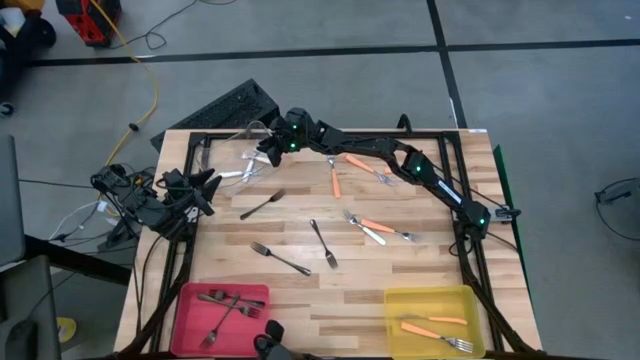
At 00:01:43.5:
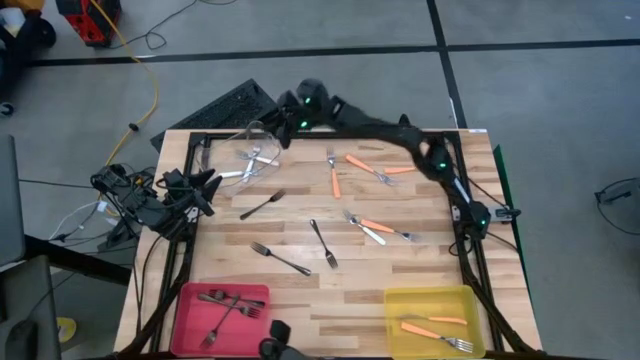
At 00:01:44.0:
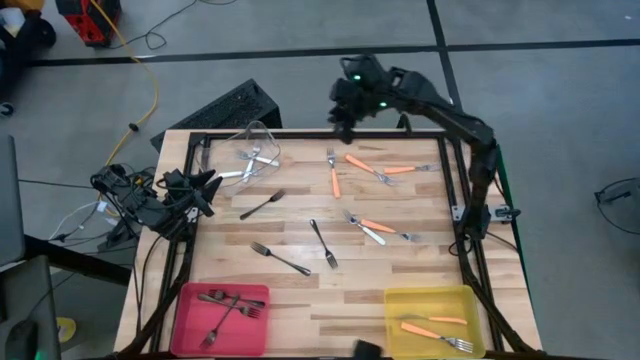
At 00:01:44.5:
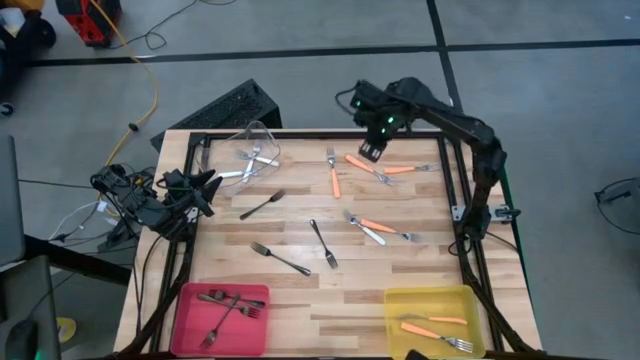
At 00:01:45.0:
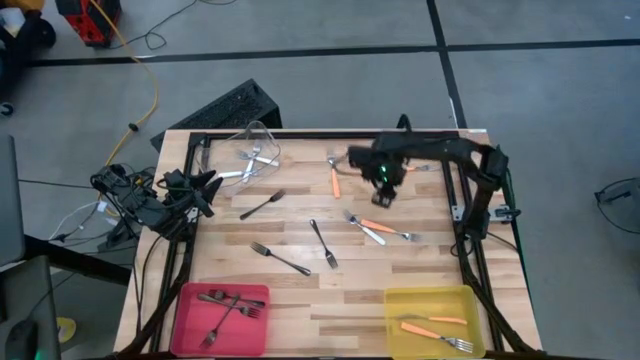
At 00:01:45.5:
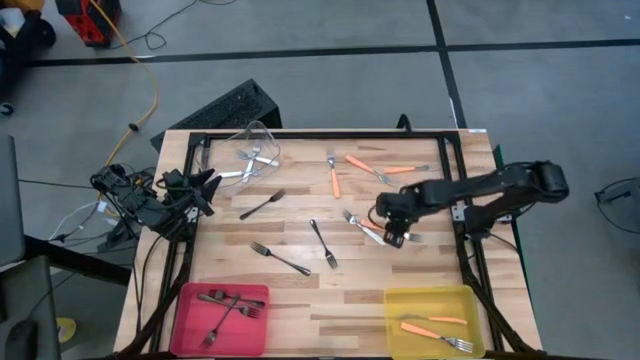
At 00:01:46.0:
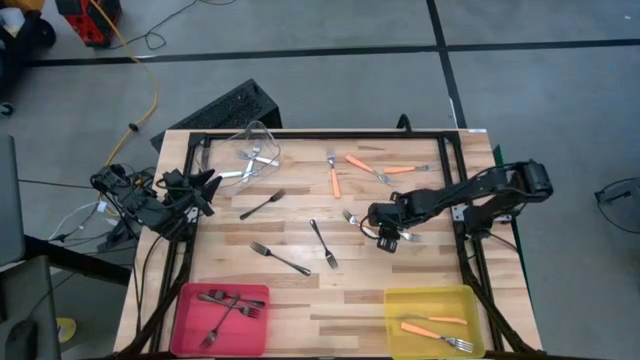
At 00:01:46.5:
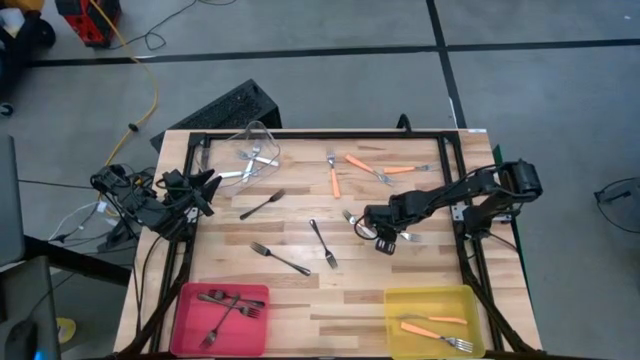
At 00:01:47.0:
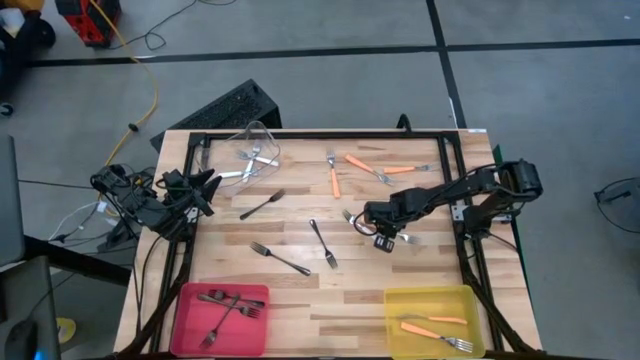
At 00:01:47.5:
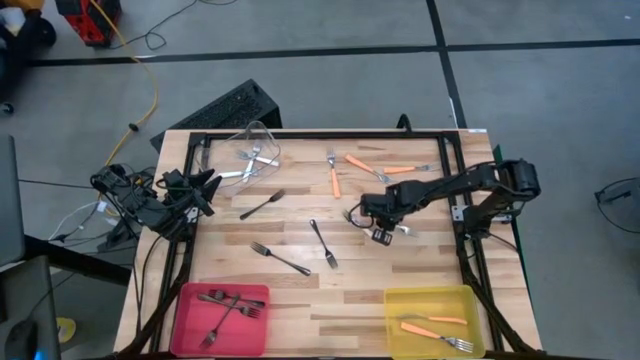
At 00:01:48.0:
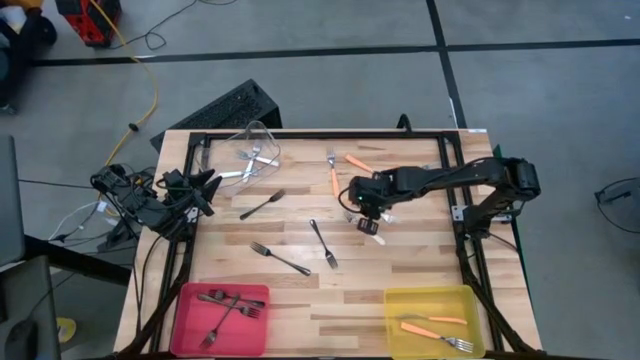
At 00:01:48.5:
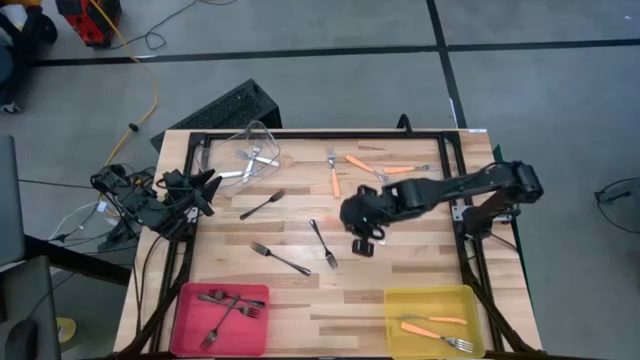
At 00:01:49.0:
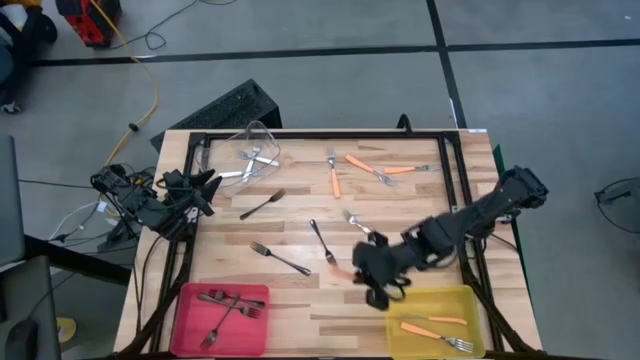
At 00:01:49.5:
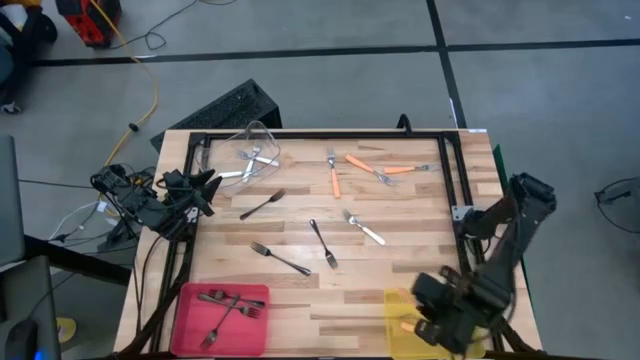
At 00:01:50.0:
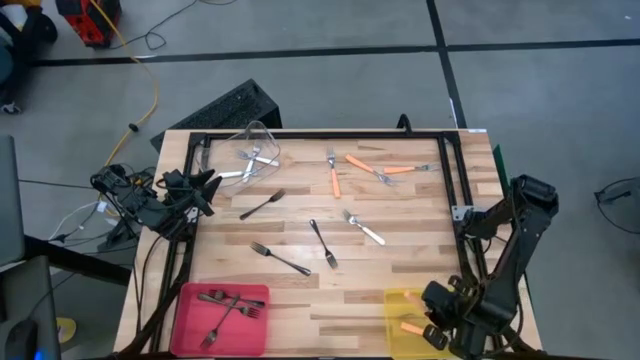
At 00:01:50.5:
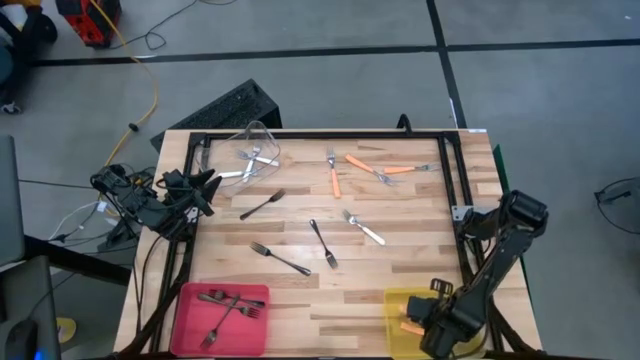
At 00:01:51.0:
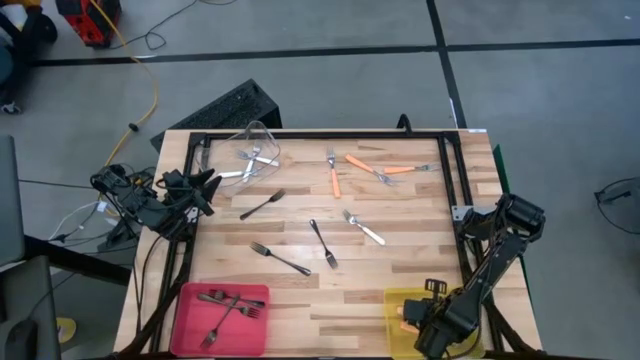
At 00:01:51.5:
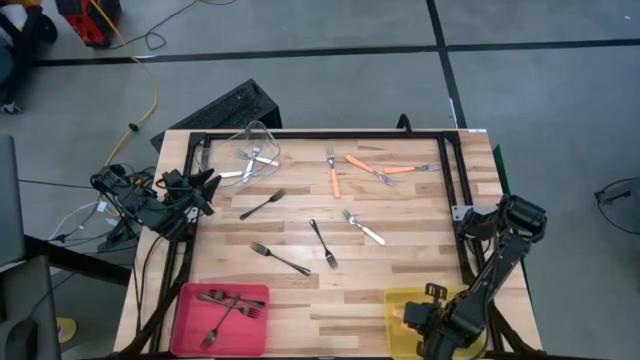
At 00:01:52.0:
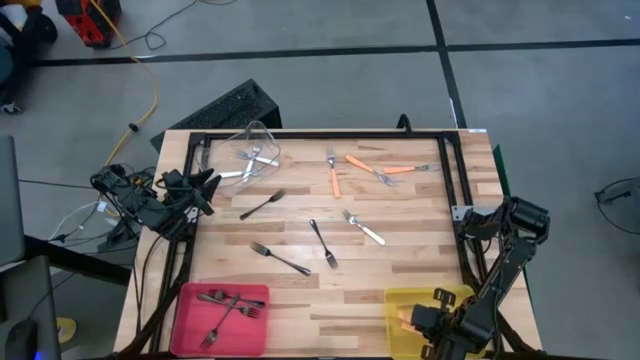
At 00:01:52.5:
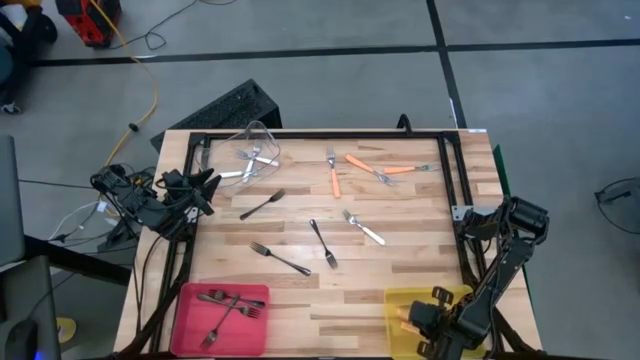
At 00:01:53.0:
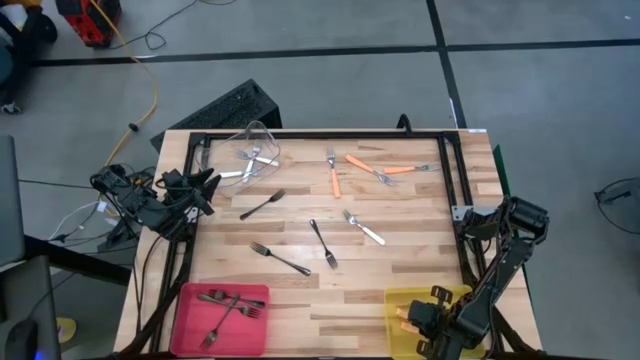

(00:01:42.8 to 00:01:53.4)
Task: Sort silverware by color (type)
Put the orange fork into the yellow bin

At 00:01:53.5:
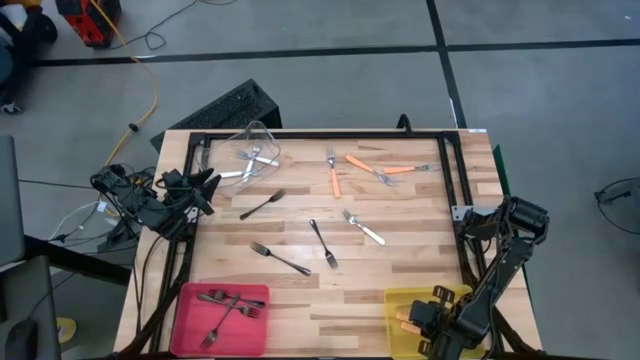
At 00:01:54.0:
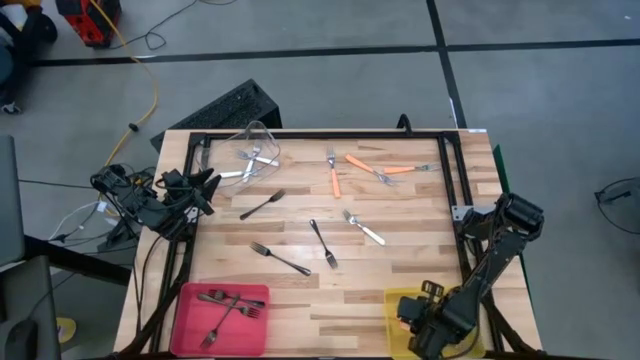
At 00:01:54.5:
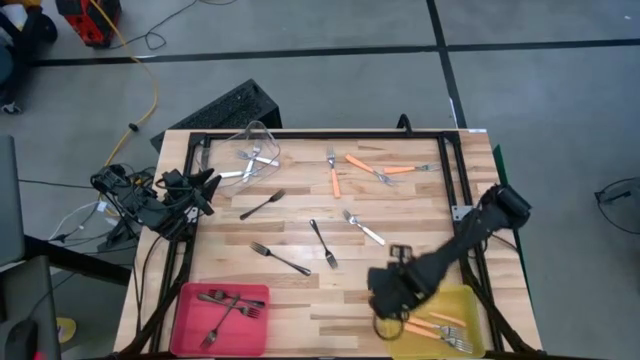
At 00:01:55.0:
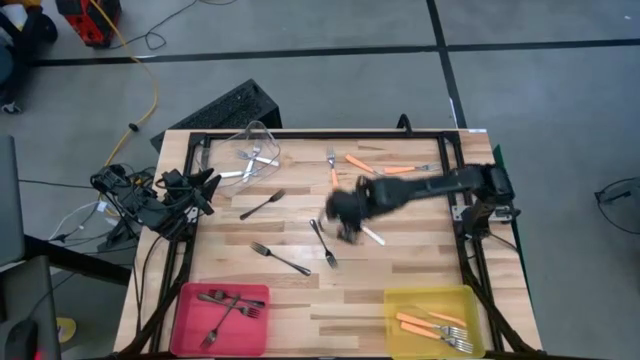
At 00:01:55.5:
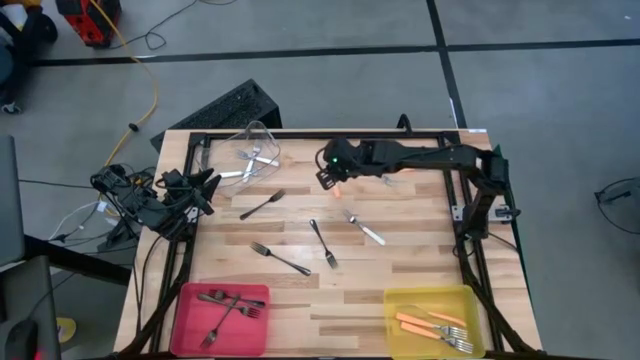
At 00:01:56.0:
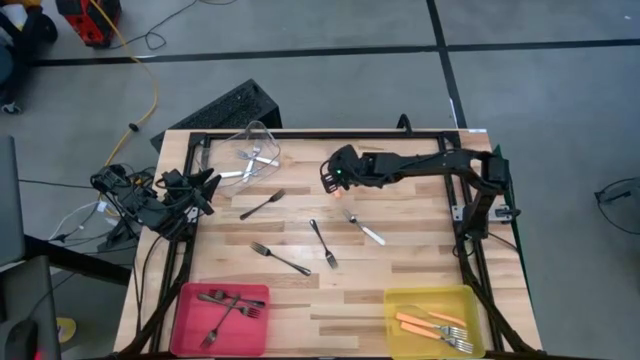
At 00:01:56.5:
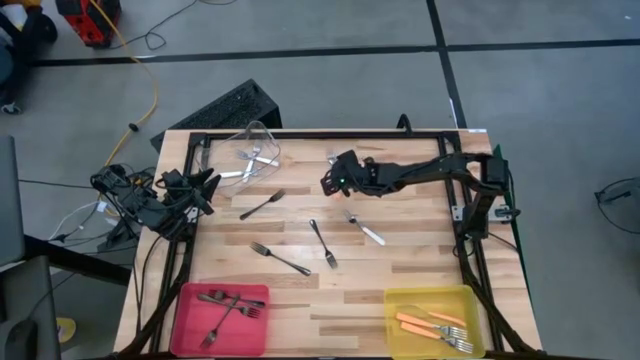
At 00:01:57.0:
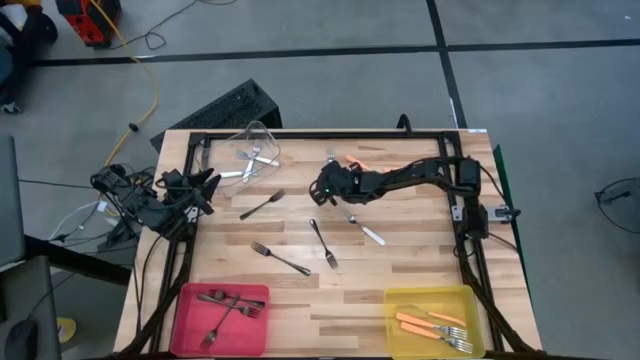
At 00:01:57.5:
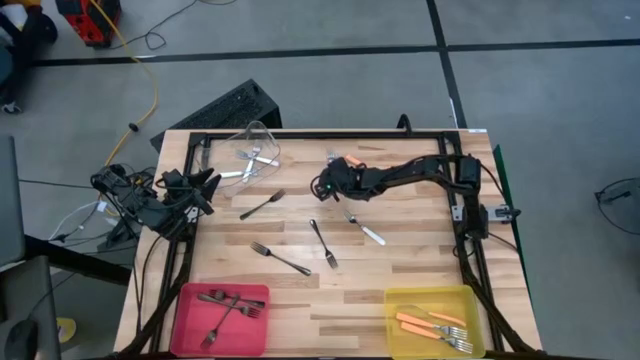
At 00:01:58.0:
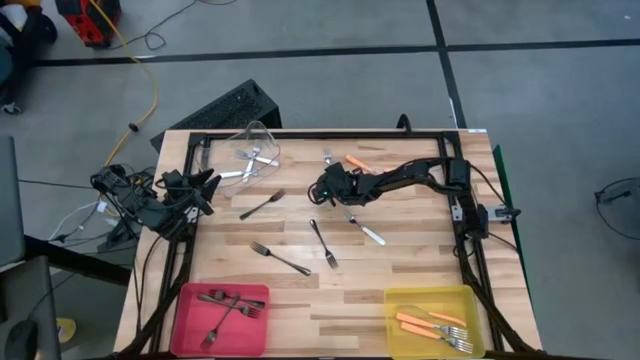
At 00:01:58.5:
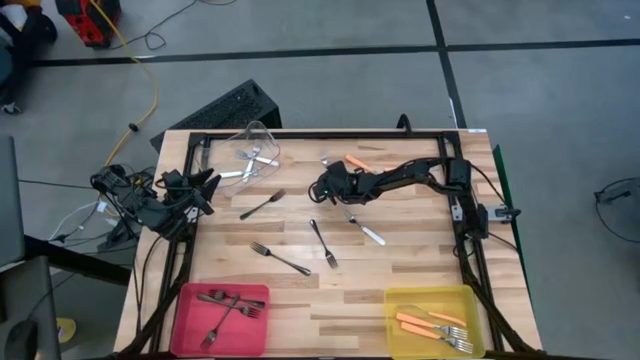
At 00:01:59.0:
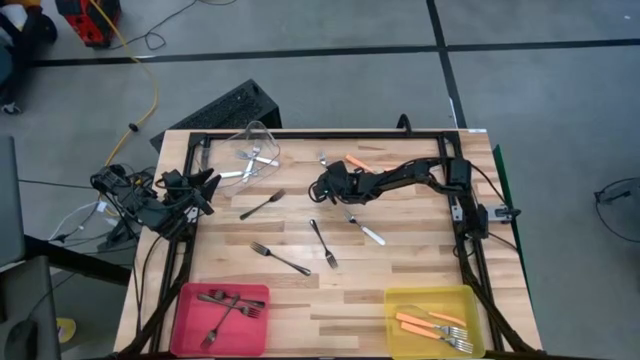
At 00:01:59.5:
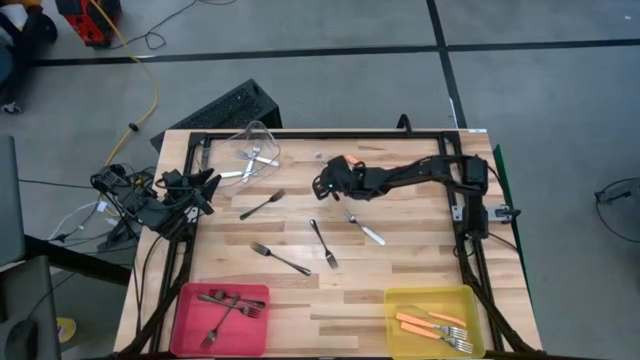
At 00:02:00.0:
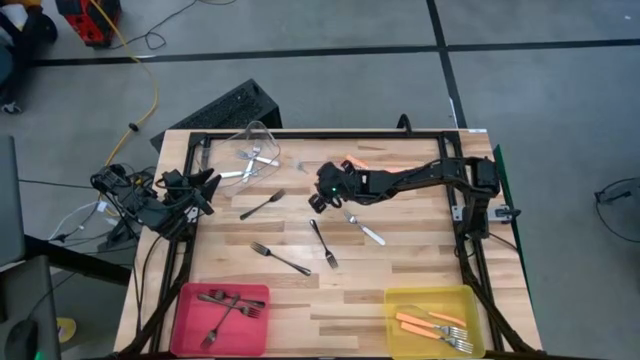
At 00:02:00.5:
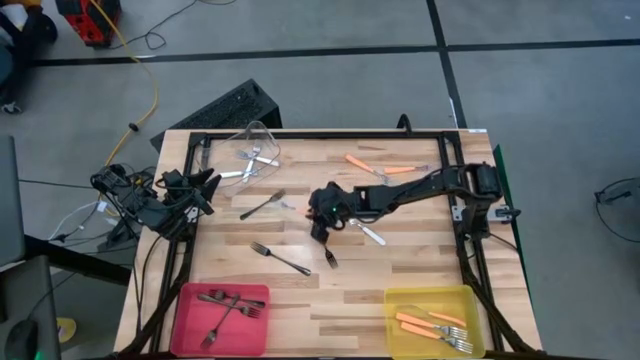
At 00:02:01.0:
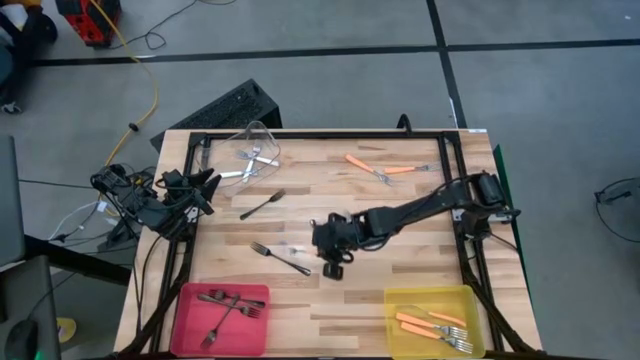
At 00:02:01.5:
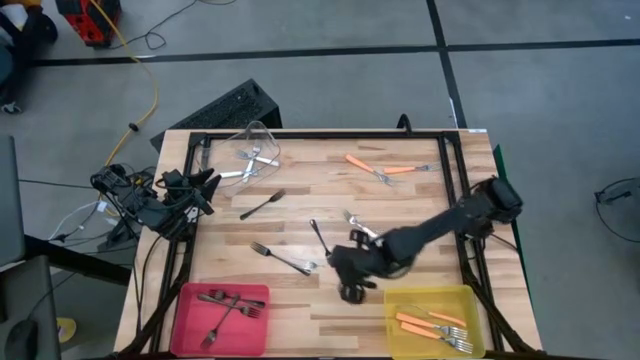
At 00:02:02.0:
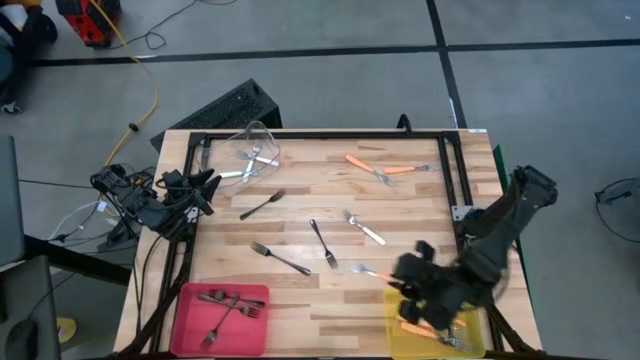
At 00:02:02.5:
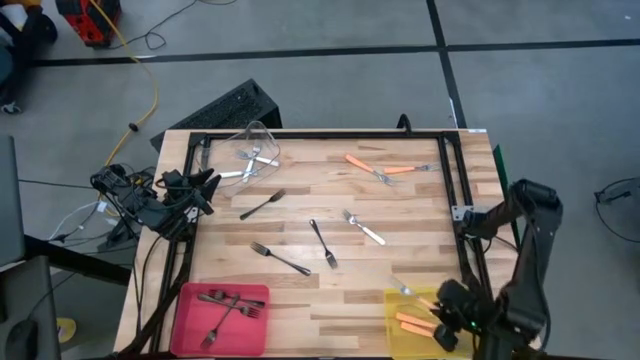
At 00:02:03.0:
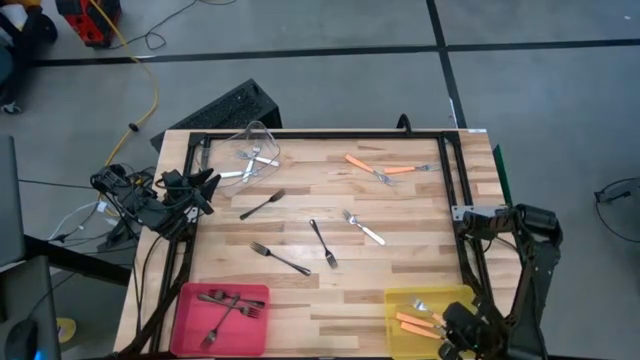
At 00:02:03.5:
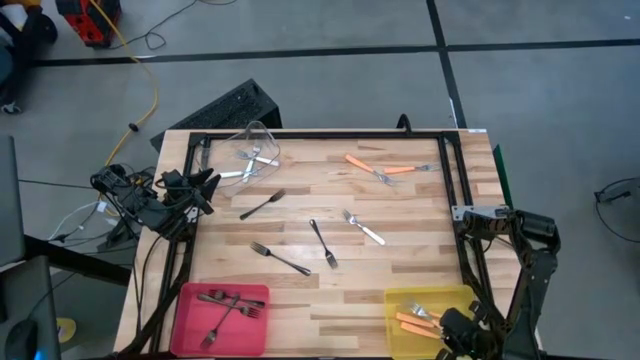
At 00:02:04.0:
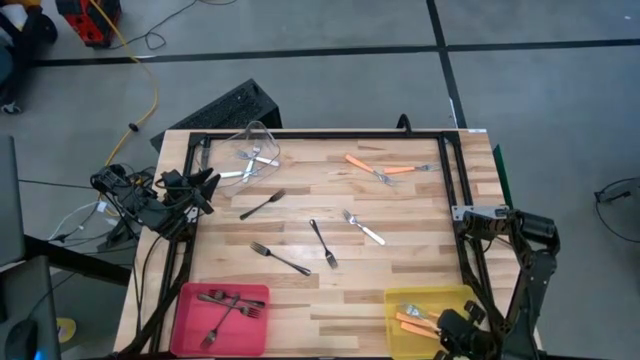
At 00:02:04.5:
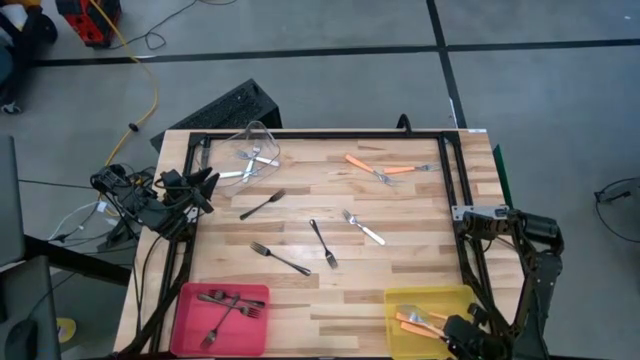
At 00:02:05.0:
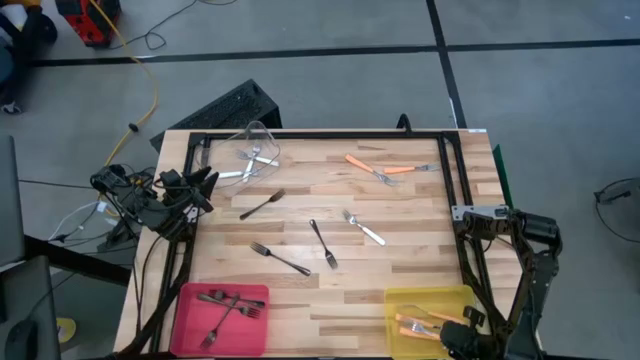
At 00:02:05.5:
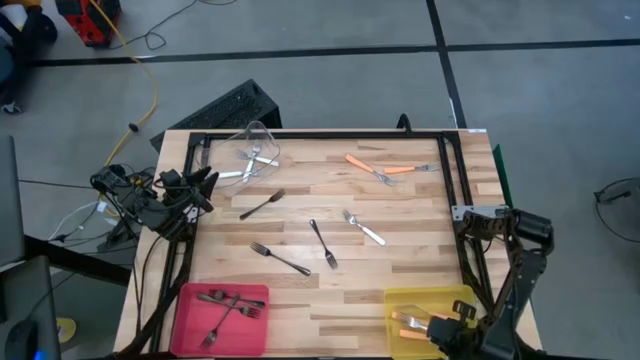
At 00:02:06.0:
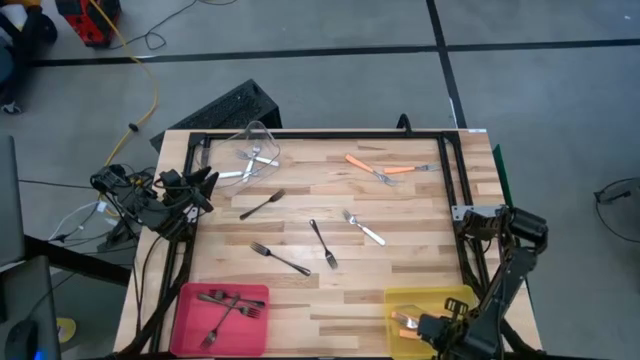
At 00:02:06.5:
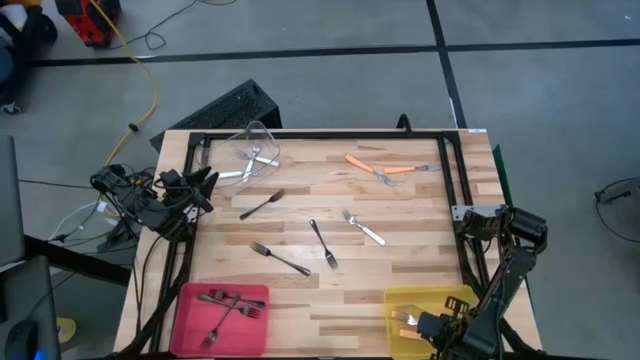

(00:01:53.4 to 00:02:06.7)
Put the orange fork into the yellow bin
